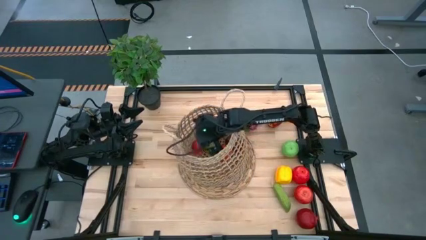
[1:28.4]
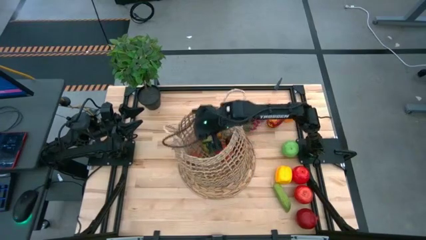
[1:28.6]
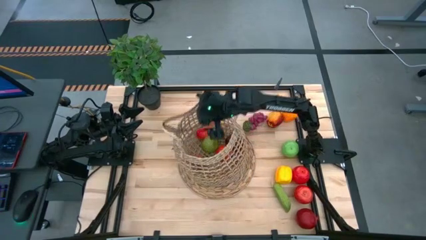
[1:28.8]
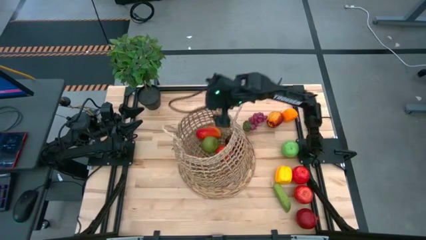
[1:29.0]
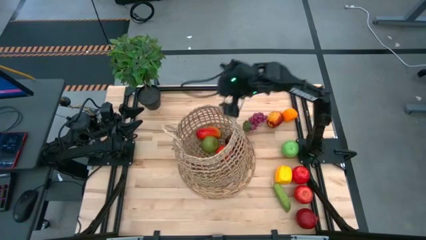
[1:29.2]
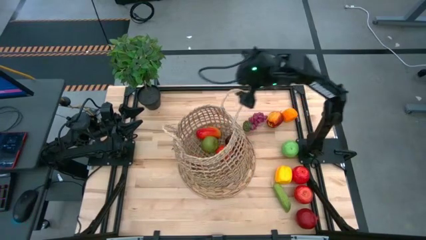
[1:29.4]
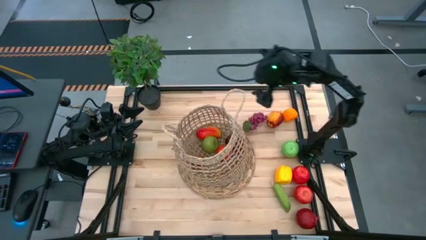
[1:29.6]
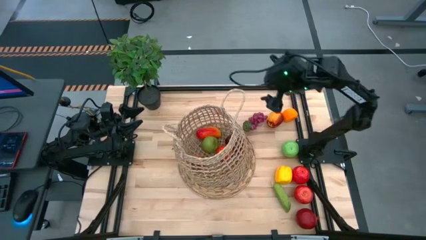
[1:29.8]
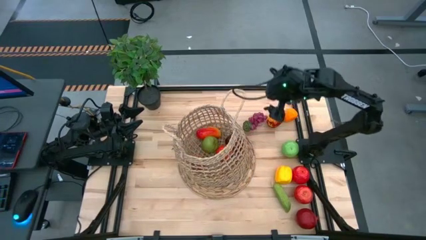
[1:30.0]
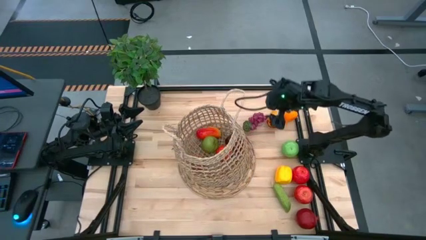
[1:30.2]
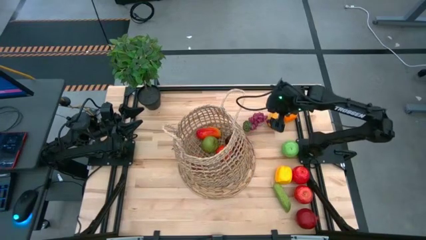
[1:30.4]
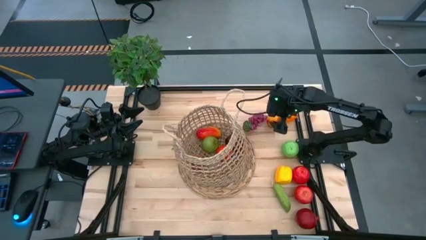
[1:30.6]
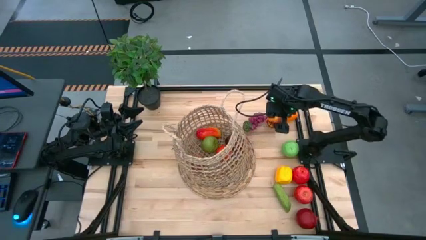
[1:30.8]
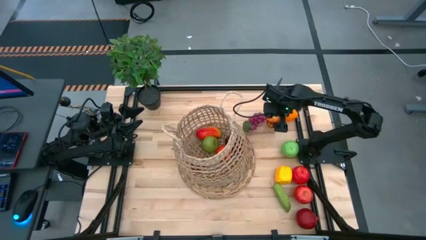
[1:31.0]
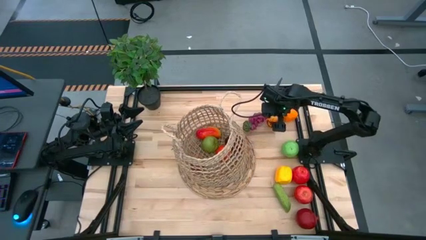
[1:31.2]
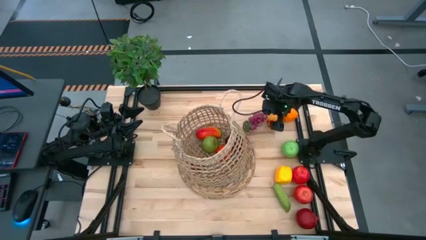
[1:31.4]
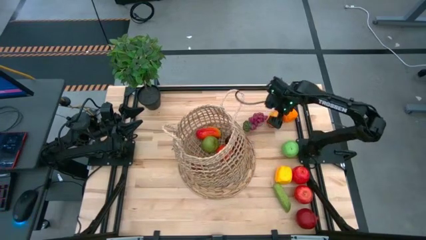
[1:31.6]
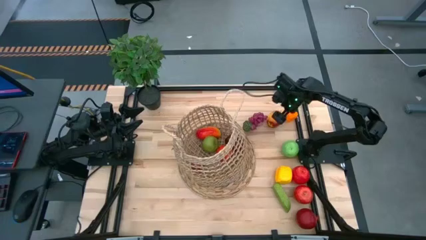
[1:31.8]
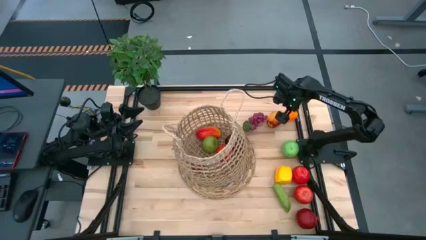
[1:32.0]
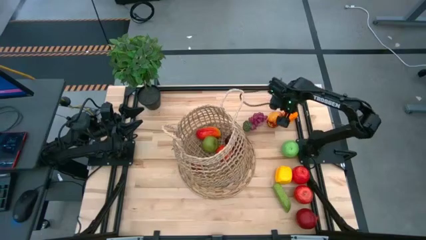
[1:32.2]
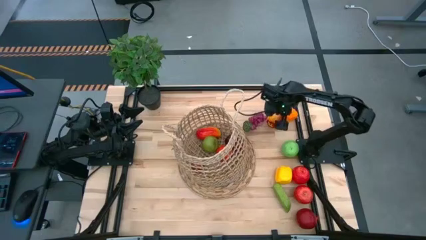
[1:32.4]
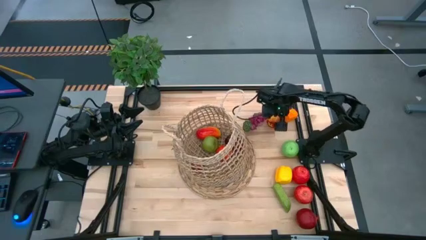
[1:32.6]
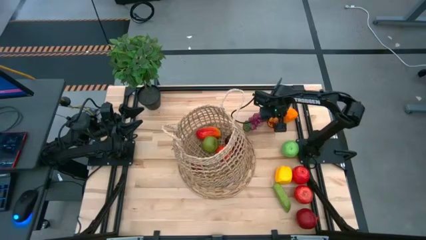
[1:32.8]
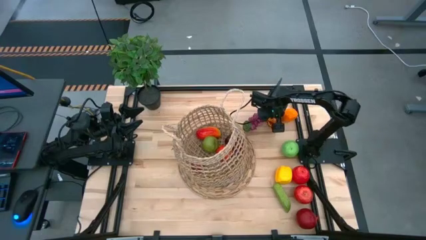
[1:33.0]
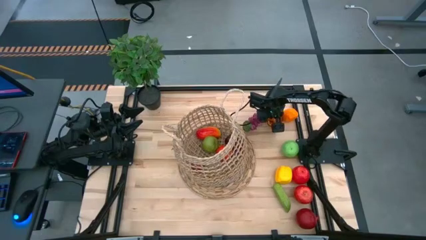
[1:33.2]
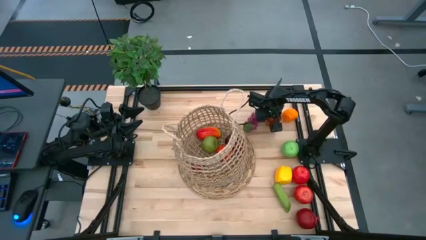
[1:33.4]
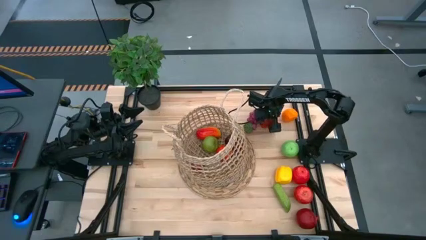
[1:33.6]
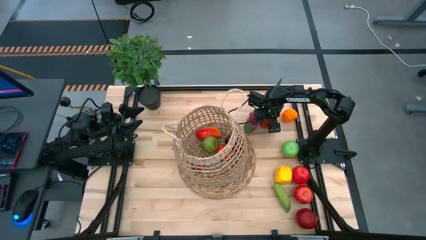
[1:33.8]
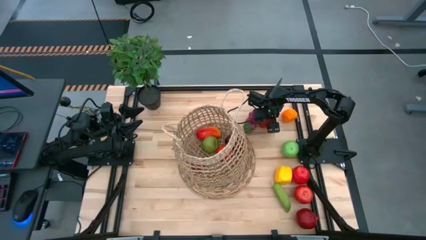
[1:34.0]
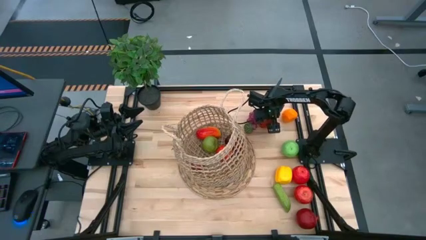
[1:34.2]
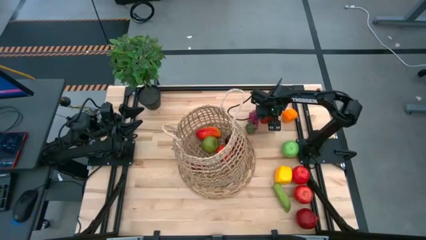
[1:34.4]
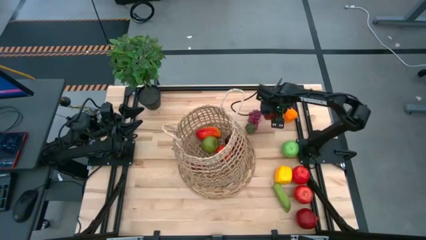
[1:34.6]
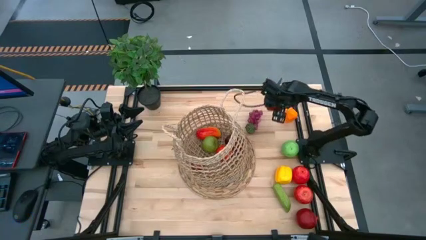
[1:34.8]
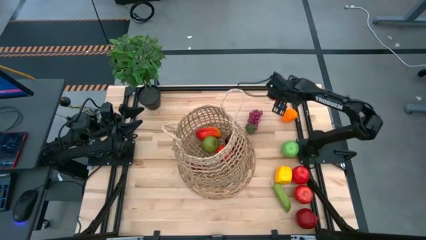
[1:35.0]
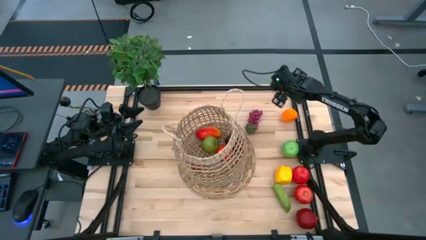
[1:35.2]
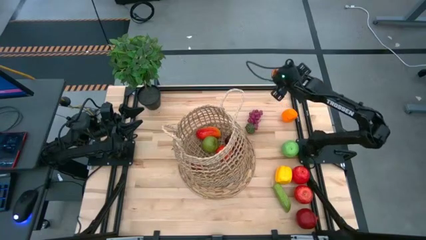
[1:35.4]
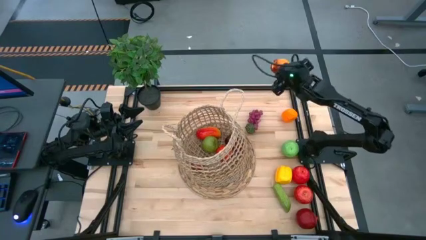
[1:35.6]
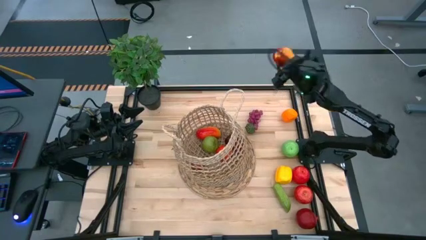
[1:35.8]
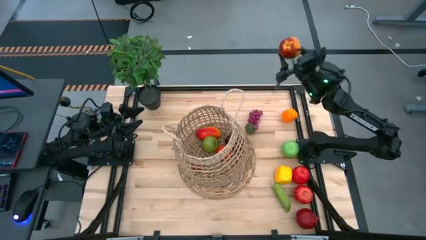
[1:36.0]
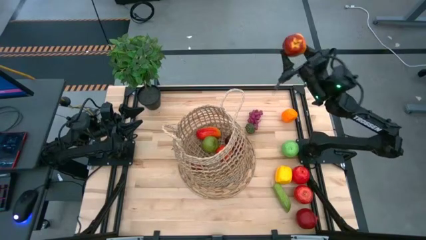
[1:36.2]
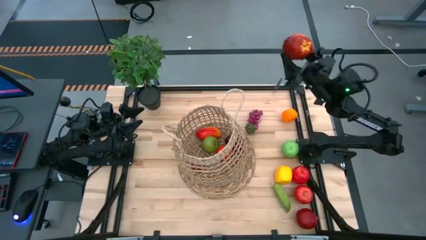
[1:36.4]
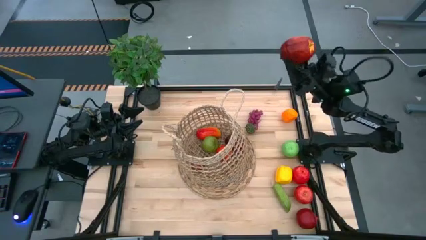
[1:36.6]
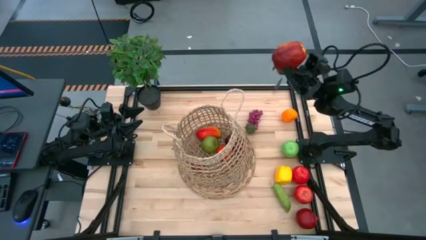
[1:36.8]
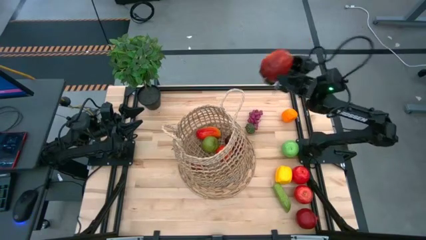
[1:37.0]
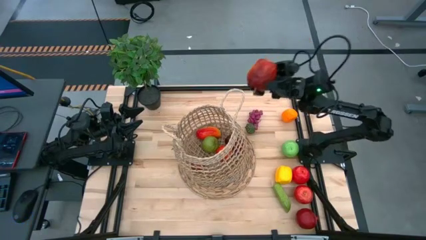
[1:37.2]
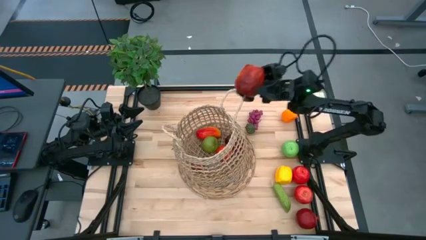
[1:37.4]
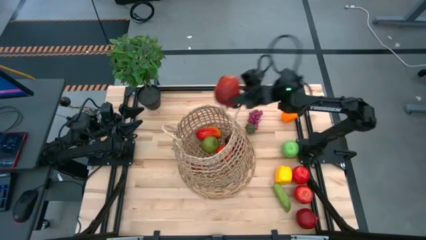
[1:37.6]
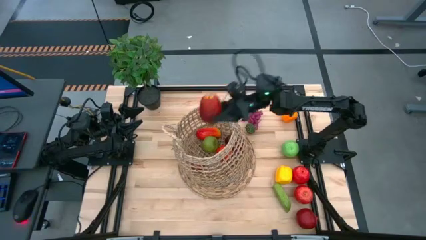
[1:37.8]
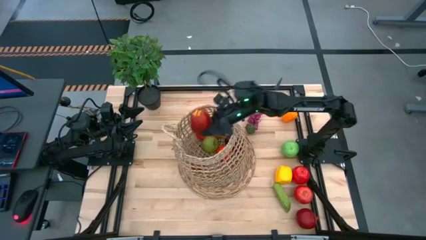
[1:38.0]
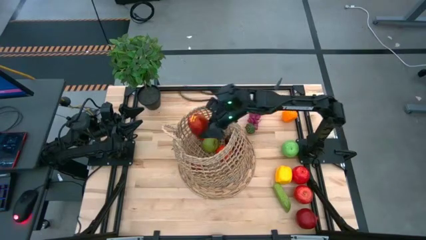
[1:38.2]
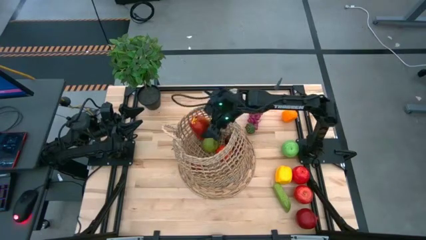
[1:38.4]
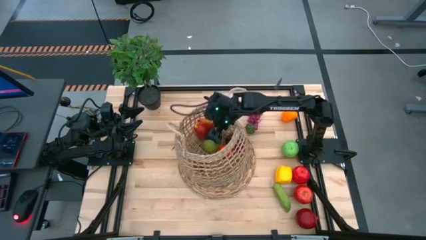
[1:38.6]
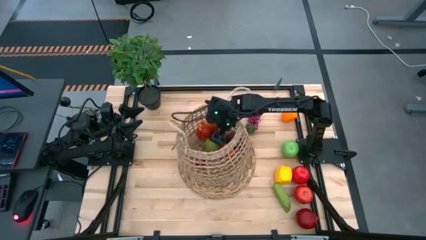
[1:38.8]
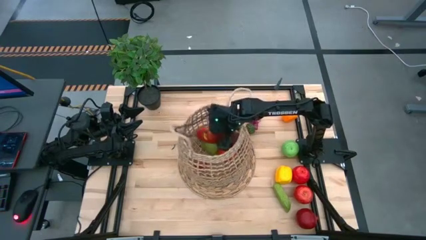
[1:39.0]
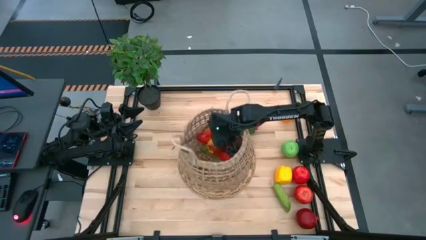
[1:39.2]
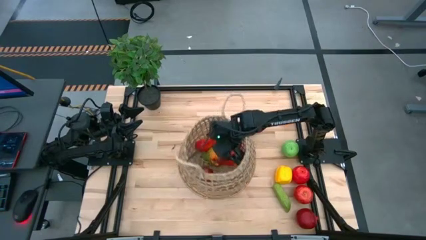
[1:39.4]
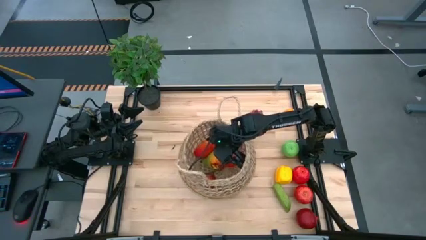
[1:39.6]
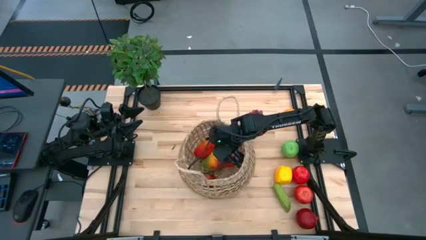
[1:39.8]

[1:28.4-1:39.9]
Task: Build produce basket
Put the yellow red apple into the brown basket

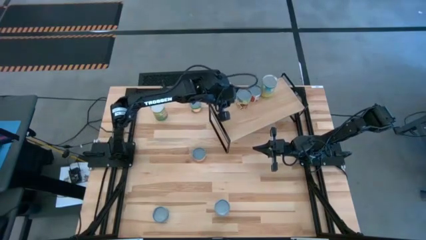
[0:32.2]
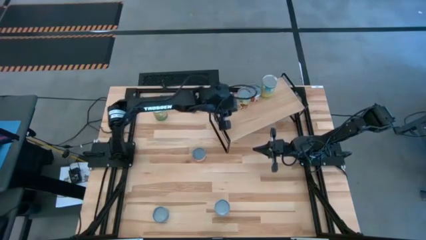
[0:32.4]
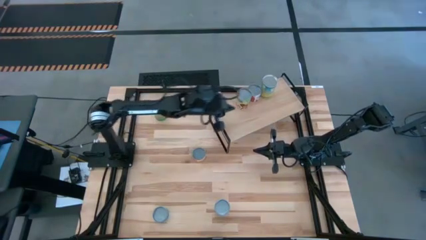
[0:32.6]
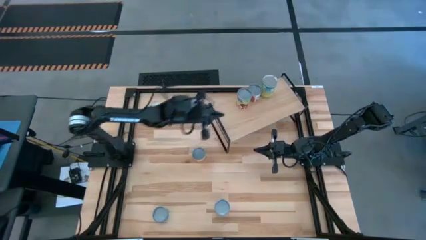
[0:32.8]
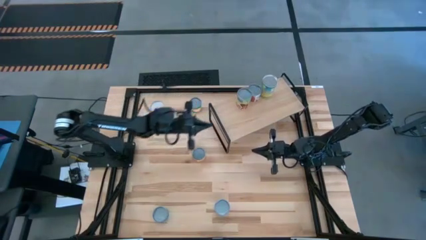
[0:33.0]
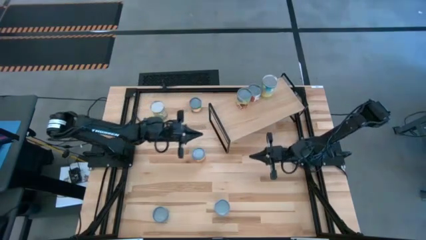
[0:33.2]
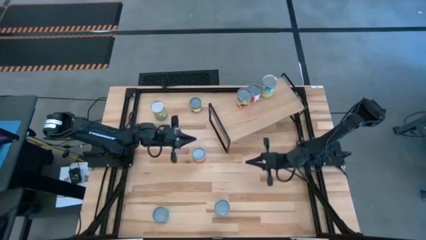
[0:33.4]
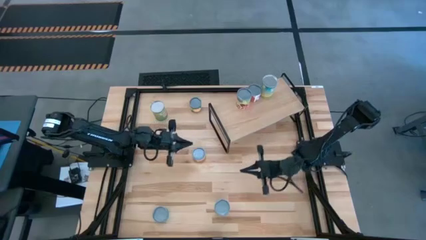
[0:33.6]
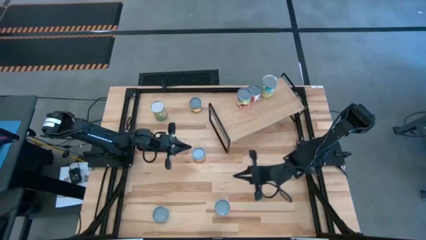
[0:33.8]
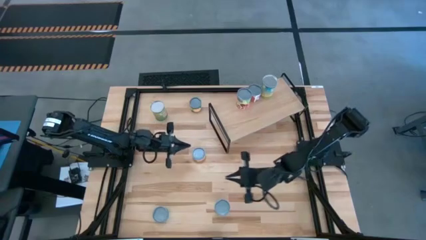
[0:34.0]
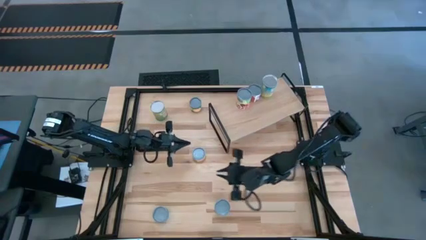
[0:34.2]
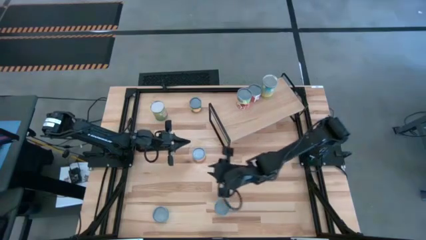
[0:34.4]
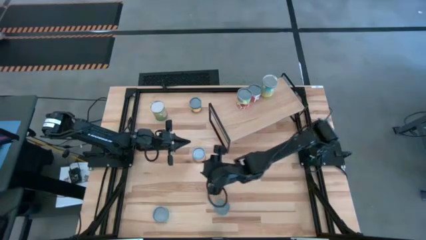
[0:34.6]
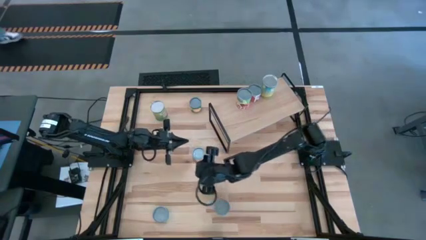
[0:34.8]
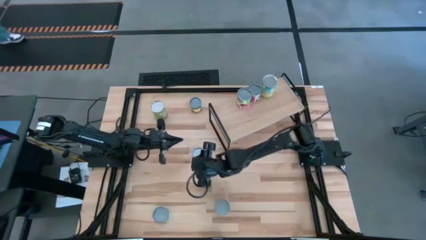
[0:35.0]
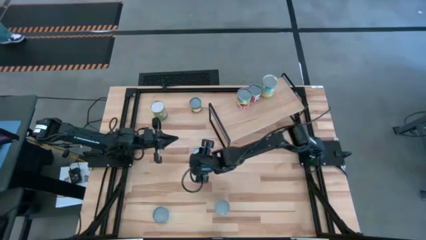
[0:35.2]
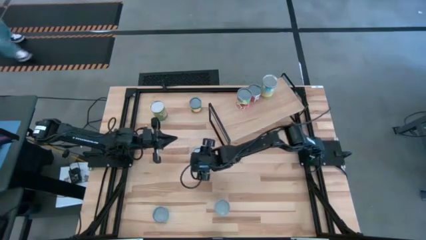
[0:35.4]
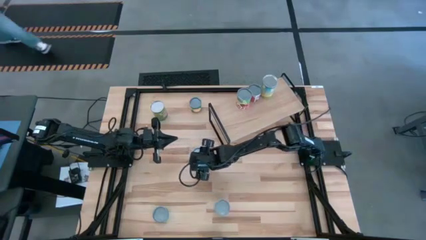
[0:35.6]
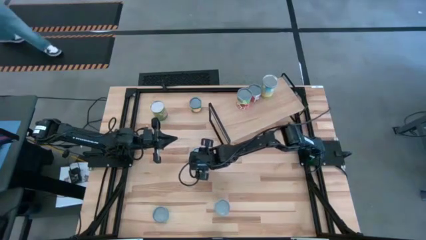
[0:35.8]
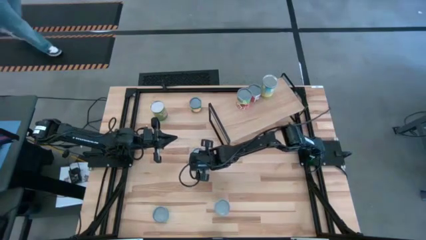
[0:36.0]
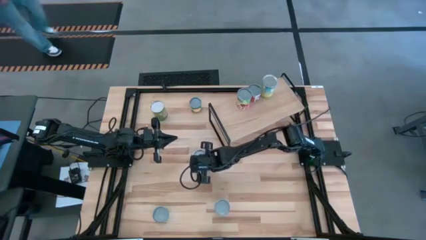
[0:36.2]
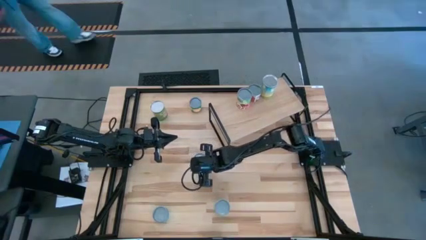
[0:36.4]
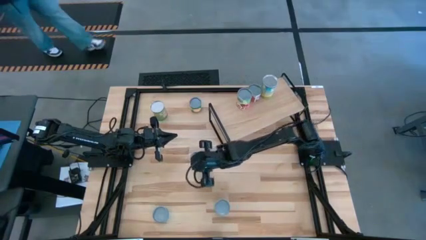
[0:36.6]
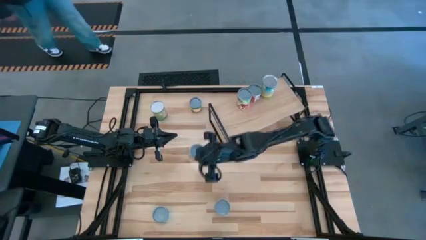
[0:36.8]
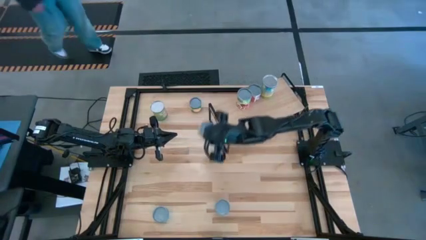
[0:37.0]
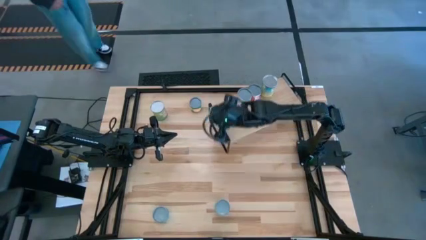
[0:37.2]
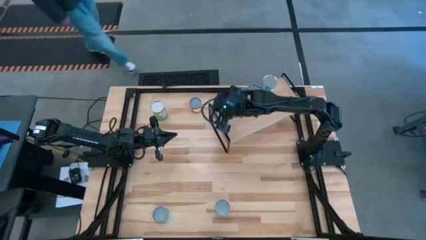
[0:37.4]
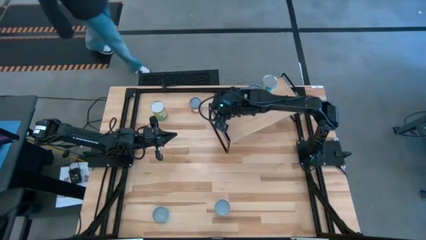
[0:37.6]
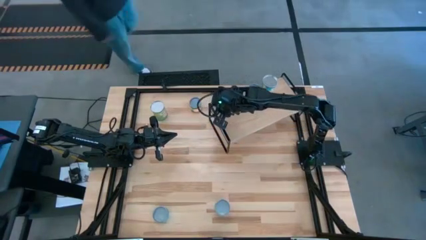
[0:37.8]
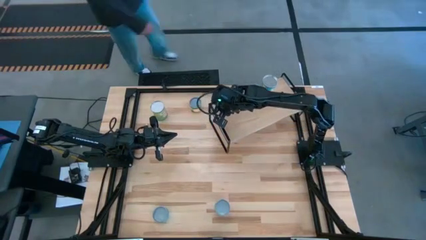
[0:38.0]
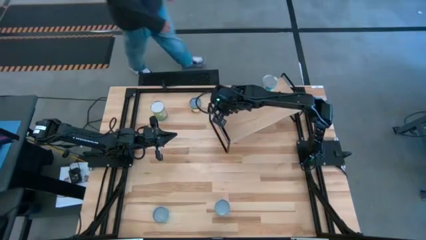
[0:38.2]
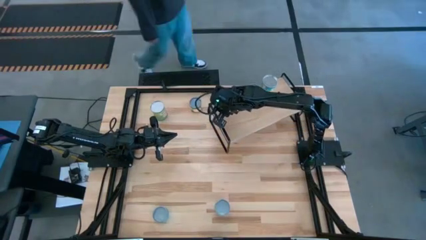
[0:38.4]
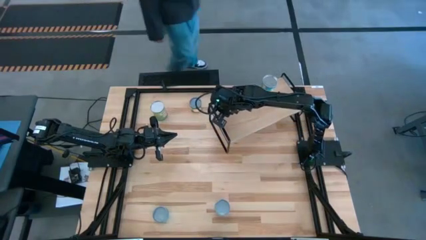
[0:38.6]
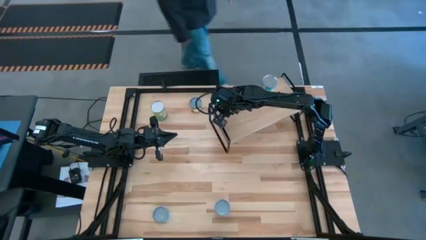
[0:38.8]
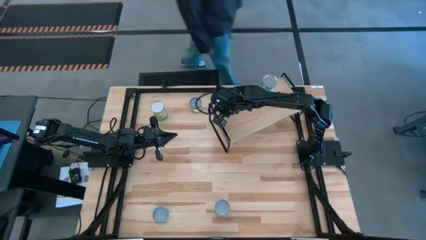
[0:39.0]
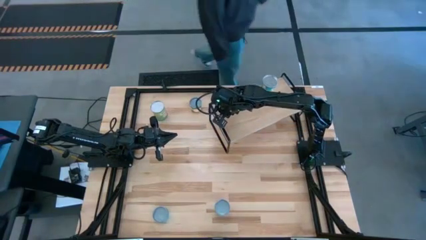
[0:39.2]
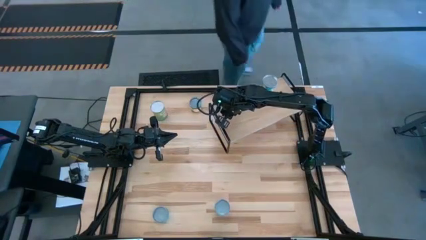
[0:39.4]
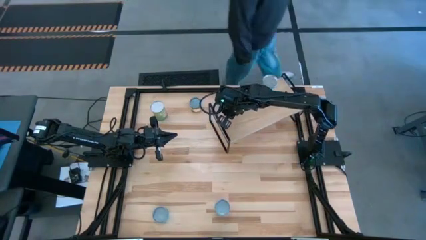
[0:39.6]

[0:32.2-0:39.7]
Task: Pick and place cans onto a shelf
Put the canned mushrooms on the shelf
